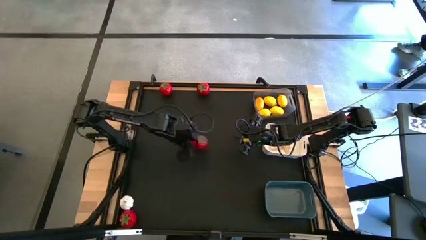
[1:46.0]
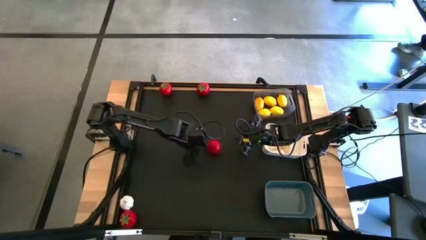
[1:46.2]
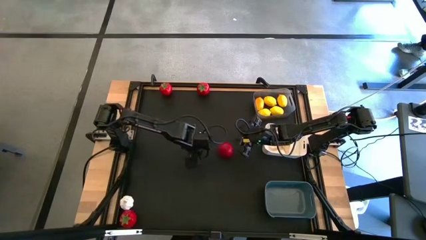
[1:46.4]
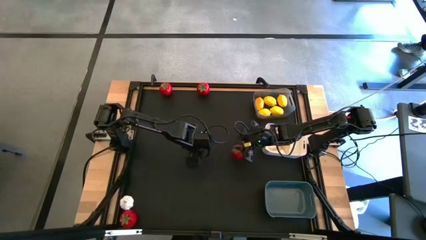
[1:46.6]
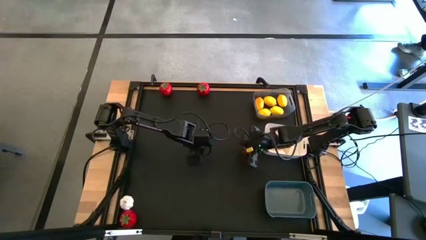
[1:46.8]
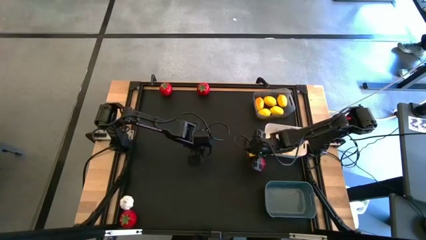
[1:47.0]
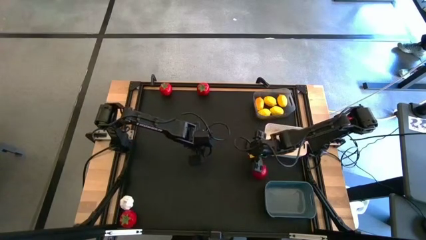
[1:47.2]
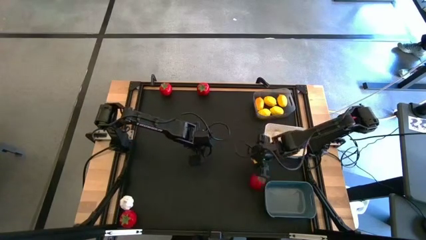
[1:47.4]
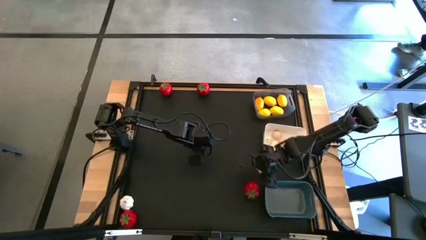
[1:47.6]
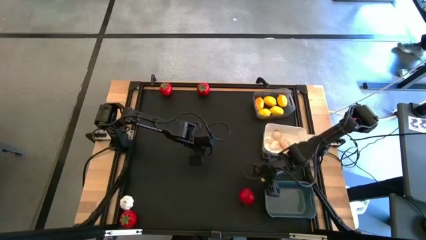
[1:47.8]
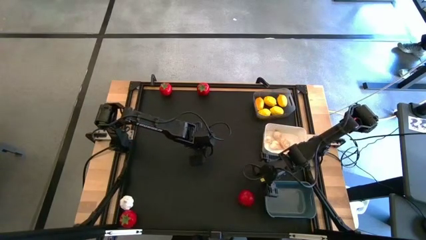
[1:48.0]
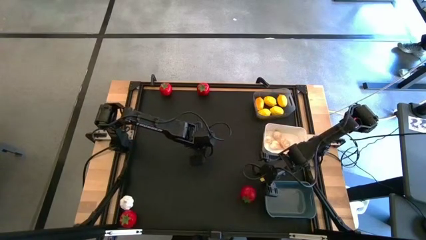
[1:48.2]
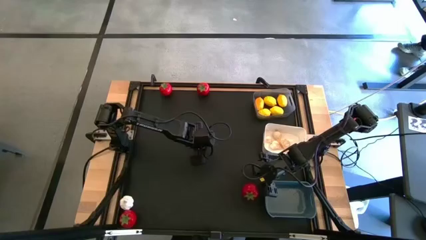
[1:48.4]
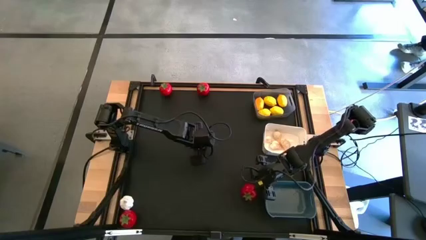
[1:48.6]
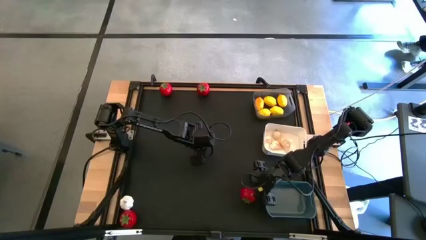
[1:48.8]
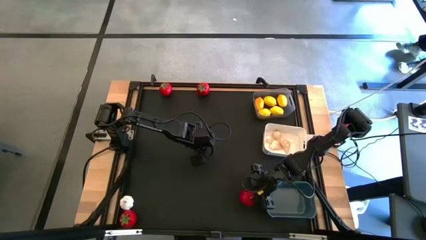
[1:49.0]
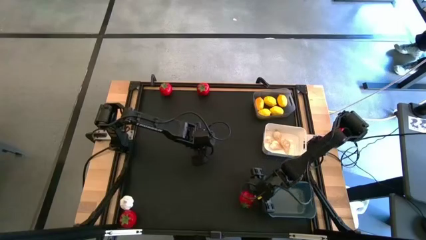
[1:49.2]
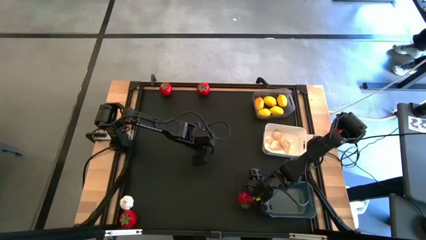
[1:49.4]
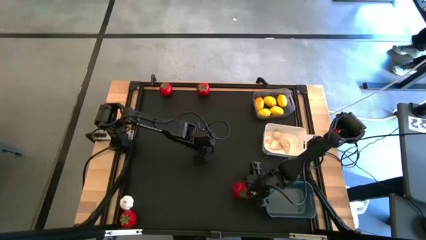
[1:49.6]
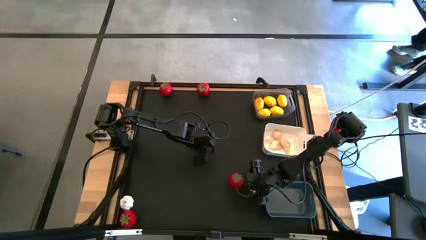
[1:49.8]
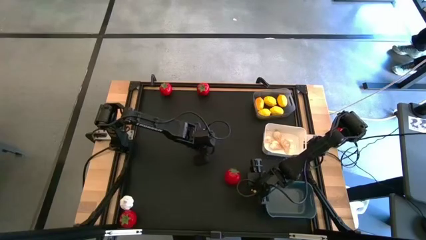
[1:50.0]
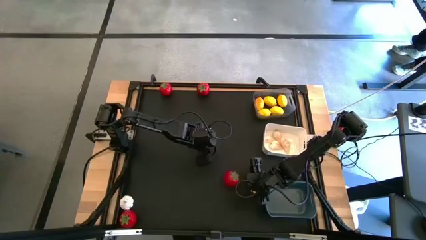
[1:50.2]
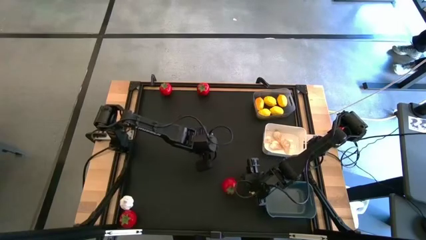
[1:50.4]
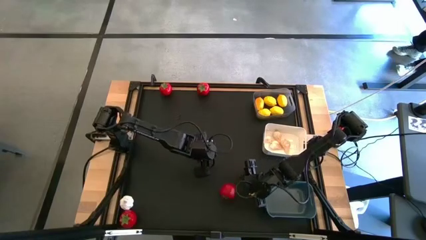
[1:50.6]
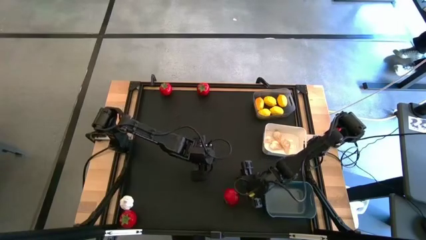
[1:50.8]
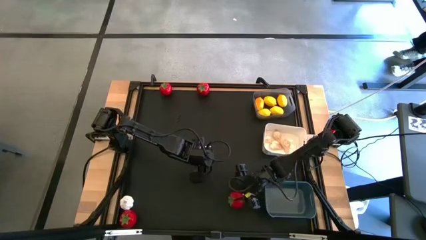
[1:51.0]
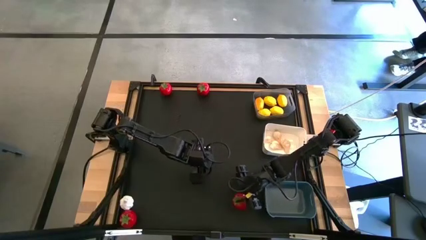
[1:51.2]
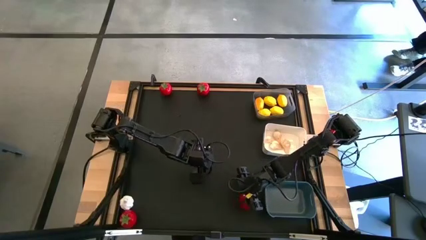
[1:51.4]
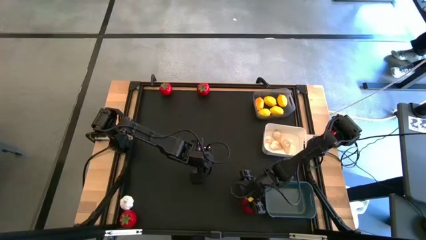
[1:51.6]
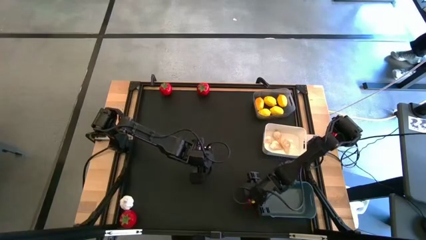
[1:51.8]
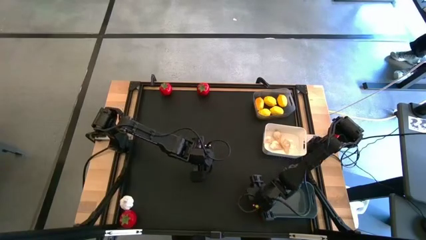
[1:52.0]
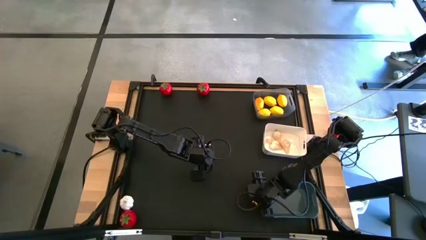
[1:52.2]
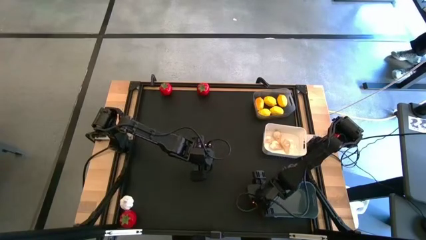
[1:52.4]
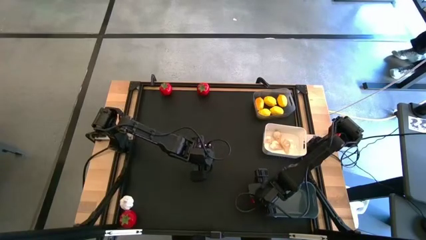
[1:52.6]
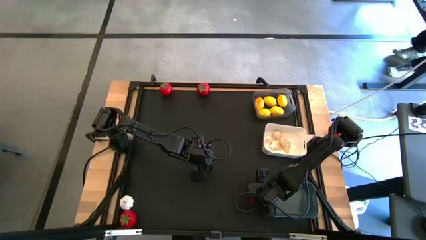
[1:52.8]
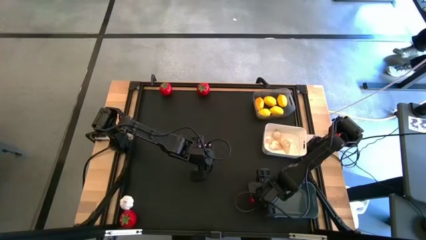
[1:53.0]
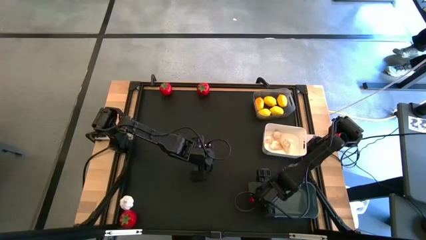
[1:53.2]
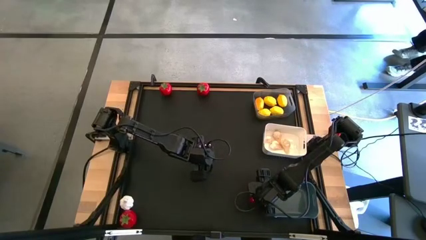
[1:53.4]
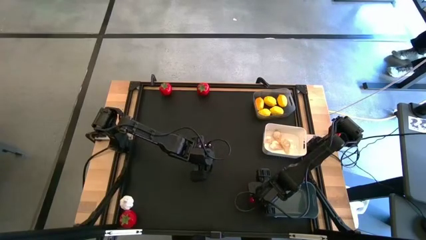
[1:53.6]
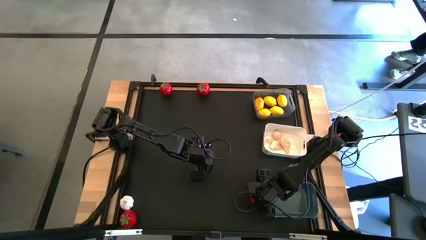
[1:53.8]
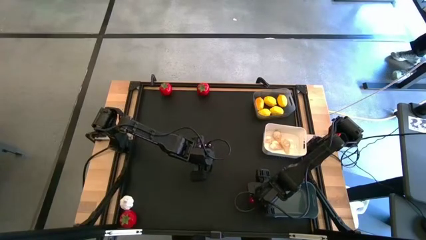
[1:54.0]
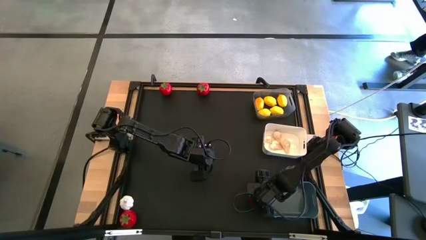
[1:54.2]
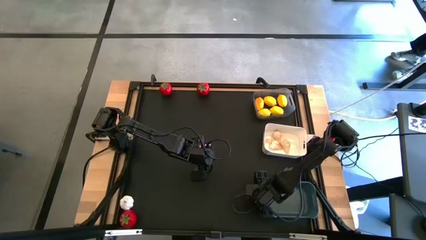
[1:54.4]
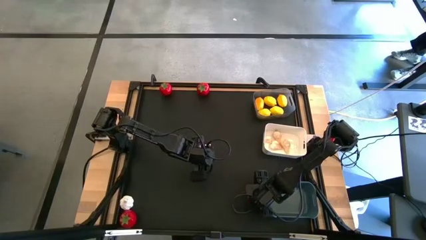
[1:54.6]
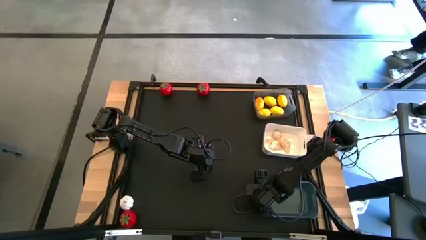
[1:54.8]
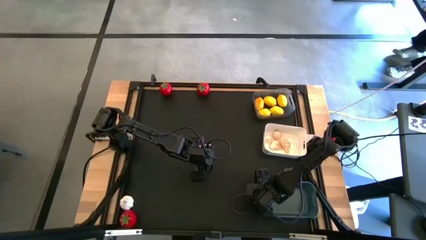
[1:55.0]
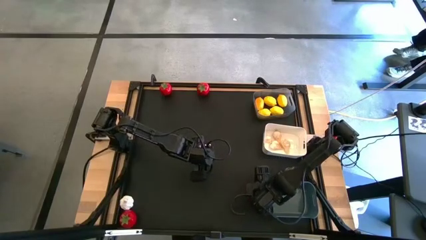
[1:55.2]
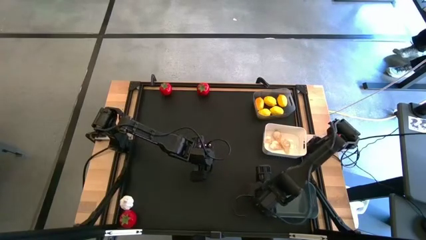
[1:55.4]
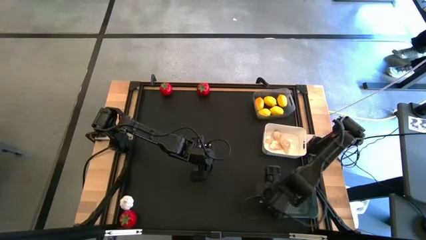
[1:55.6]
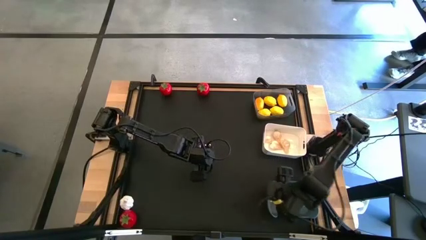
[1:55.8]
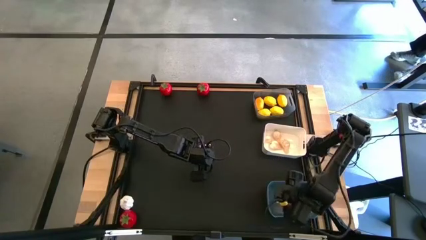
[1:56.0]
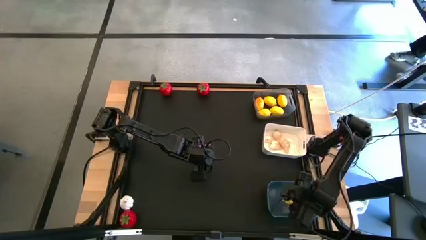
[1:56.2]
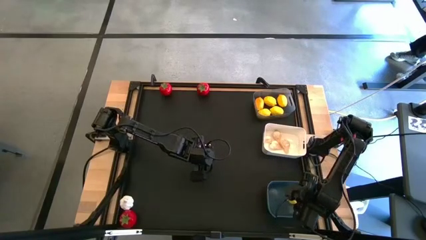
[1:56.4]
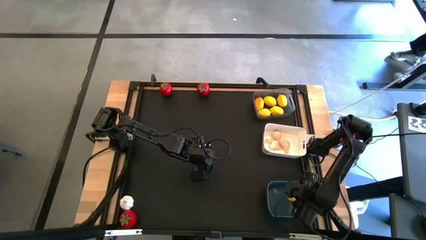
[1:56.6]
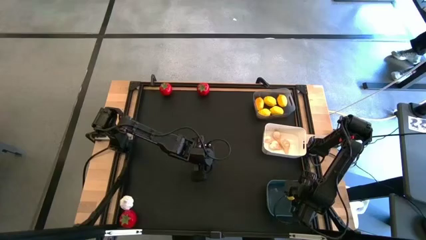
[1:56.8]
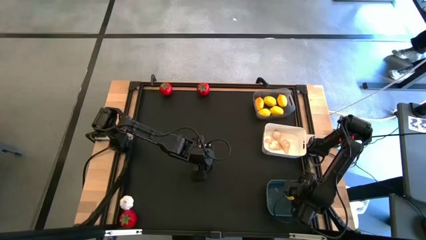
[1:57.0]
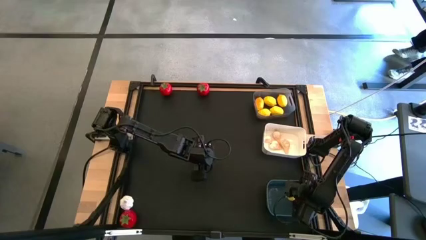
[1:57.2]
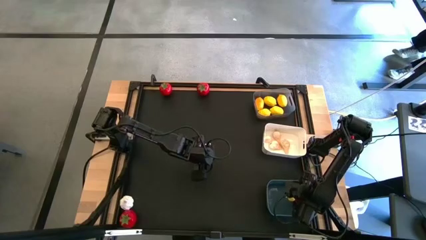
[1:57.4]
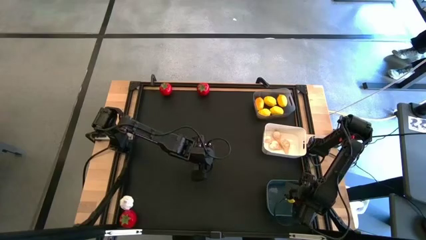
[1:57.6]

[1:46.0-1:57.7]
Task: Sort produce into baskets
Put the tomato into the the blue bin

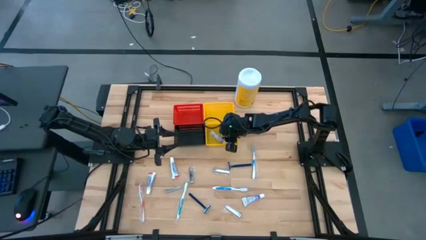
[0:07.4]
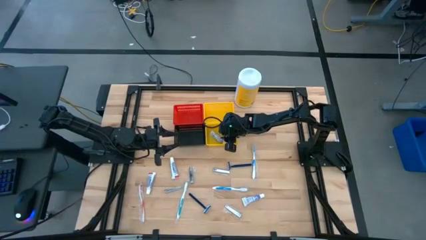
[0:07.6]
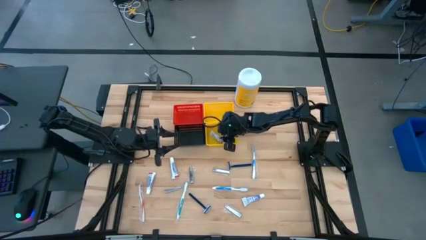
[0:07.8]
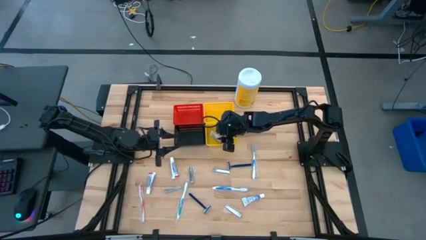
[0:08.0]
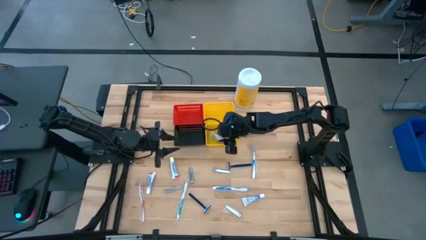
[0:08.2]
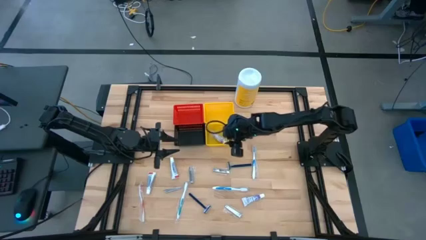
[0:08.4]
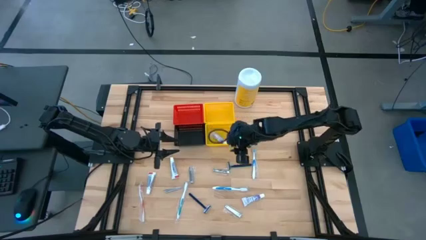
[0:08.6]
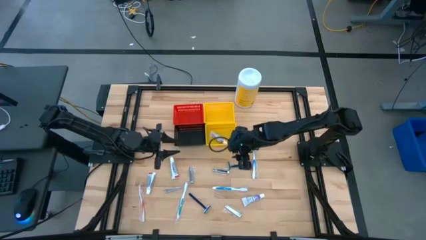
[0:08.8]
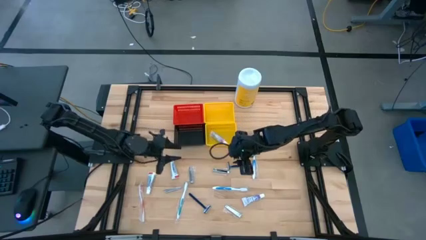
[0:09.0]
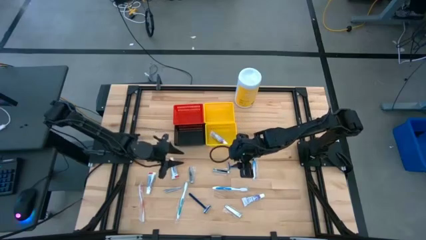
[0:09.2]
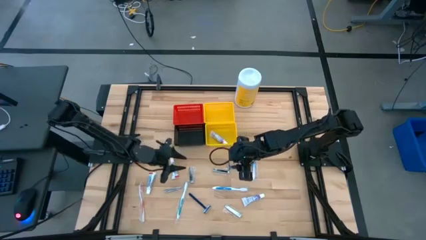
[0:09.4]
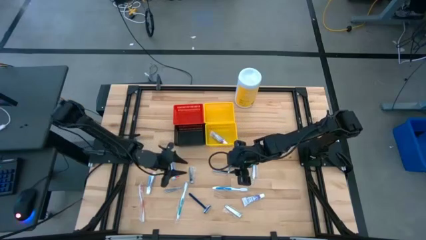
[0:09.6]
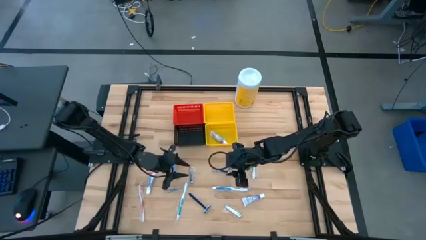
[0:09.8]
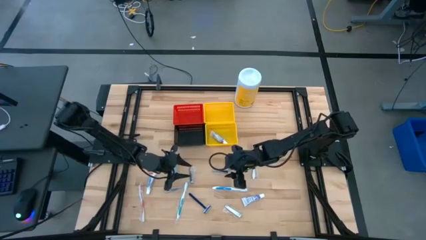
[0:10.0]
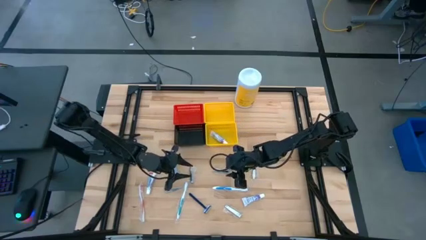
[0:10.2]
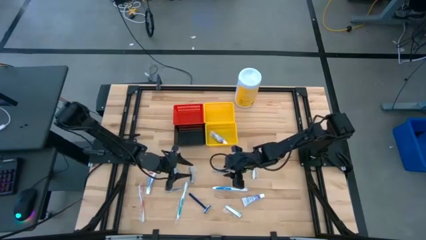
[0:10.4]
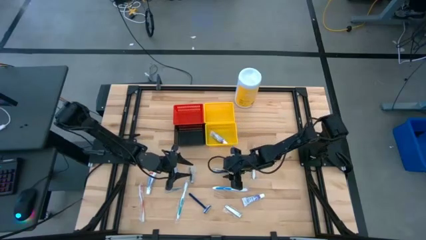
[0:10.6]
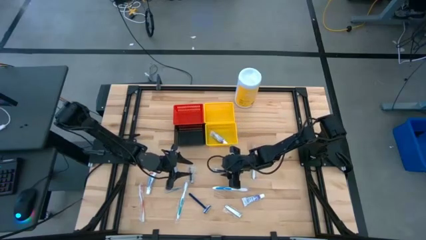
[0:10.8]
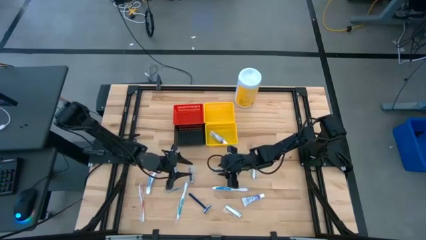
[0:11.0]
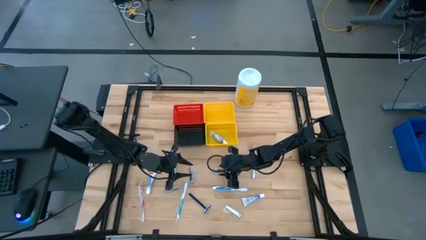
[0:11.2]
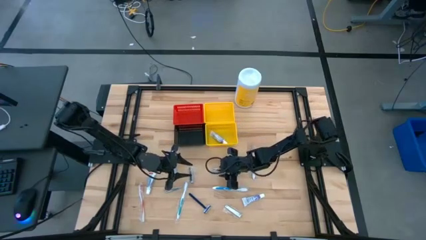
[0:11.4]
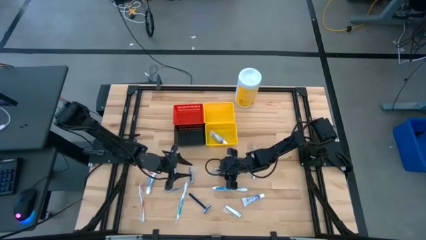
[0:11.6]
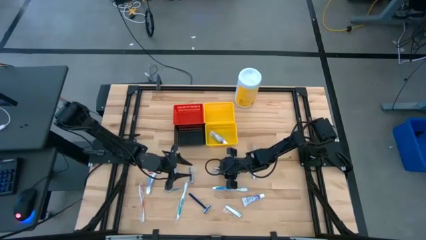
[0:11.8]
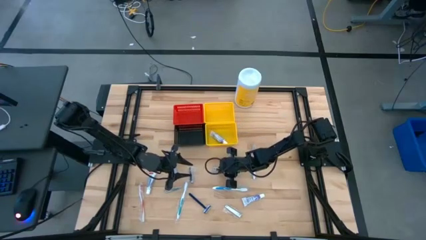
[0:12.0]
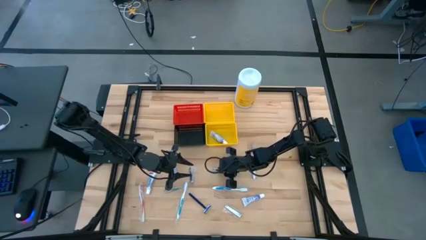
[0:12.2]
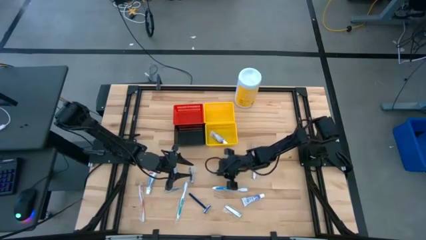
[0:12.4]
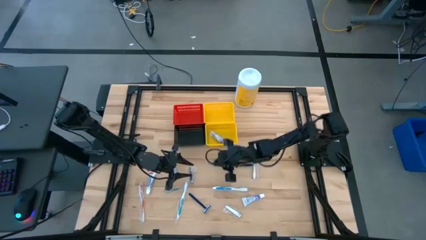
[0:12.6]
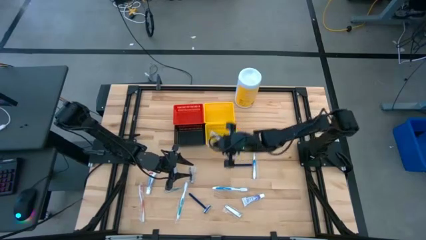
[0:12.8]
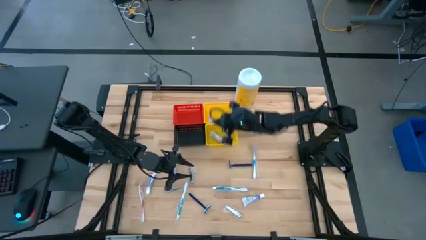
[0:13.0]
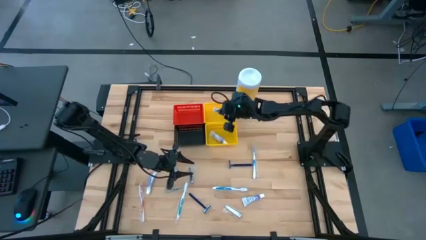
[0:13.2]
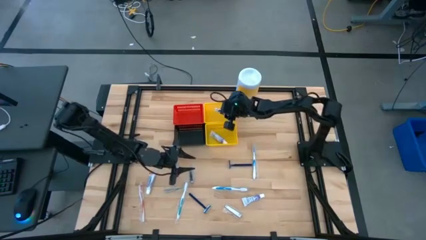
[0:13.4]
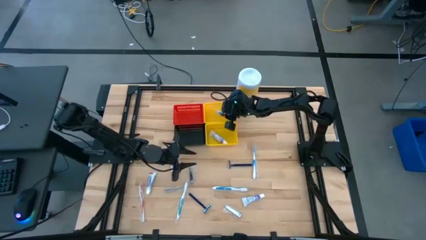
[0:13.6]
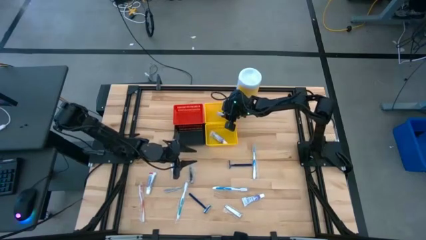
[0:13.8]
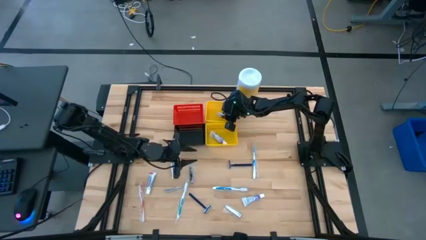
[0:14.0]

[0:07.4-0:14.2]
Task: Pick & Place Travel size toiletries
Put the silver nail cutter into the top yellow bin
